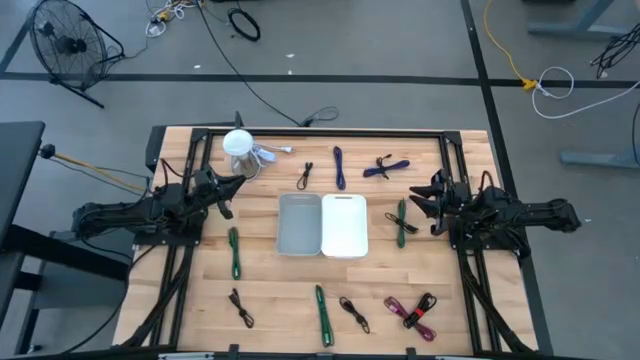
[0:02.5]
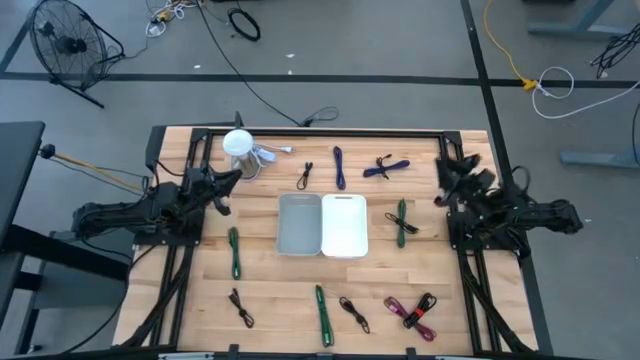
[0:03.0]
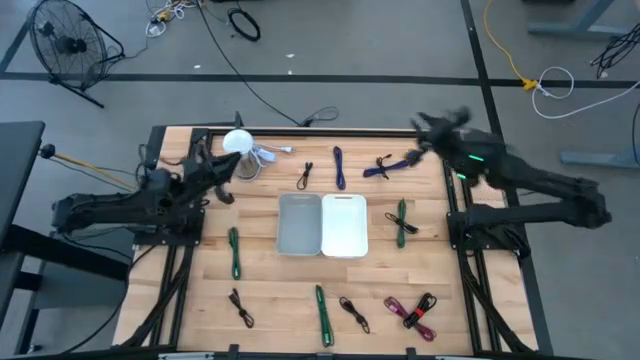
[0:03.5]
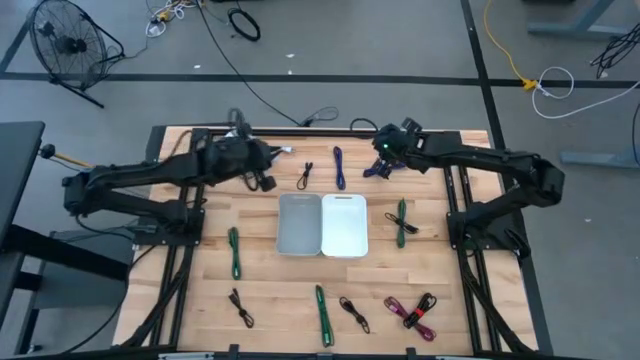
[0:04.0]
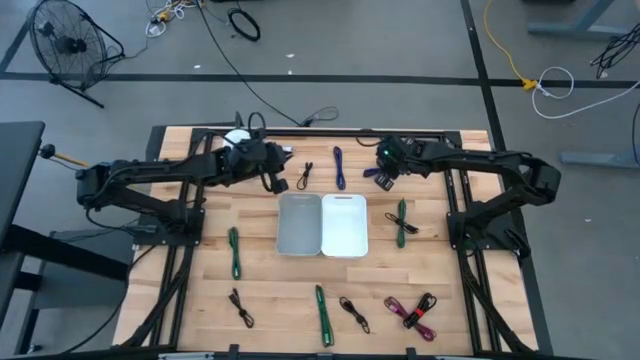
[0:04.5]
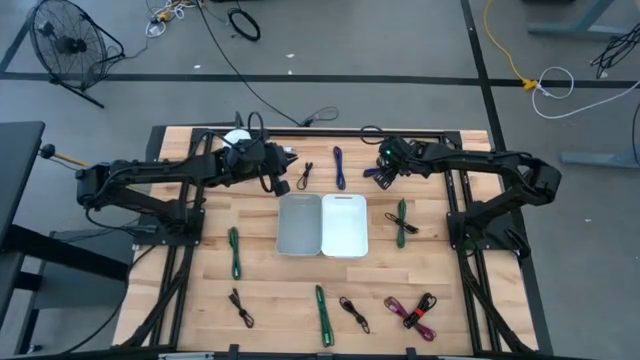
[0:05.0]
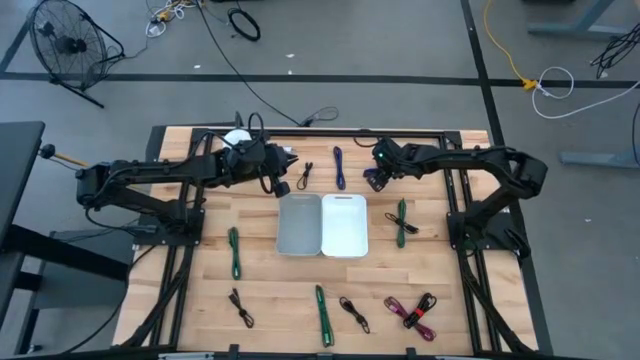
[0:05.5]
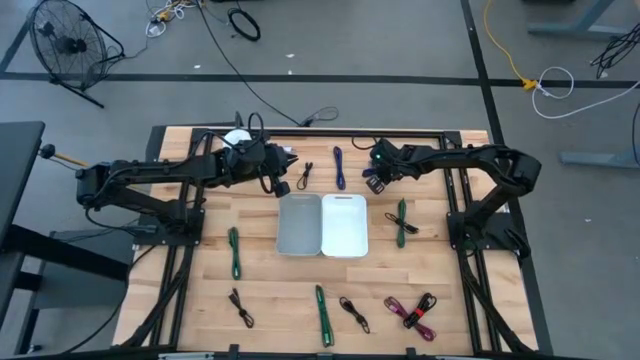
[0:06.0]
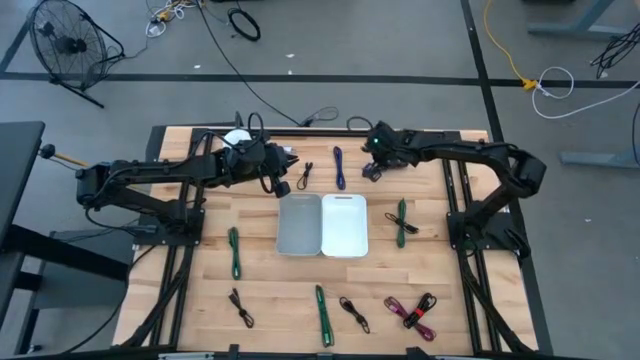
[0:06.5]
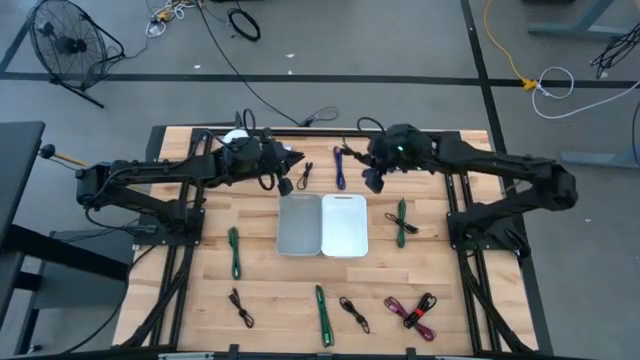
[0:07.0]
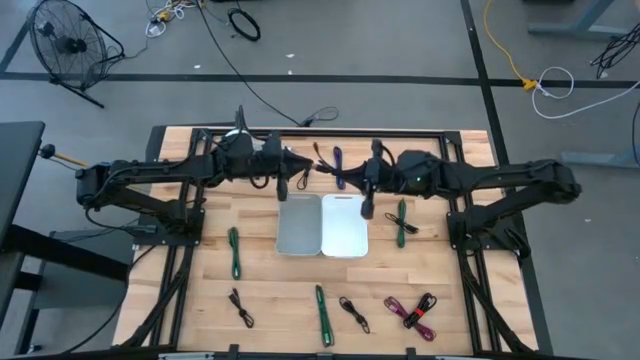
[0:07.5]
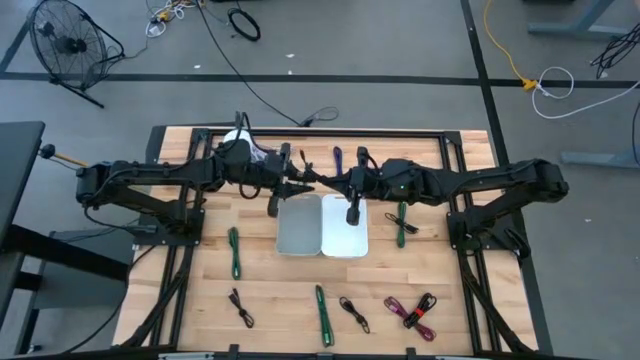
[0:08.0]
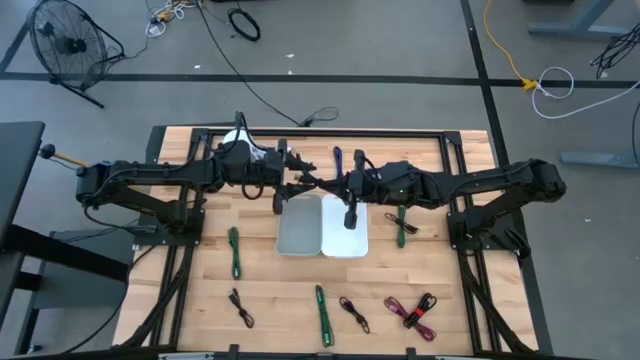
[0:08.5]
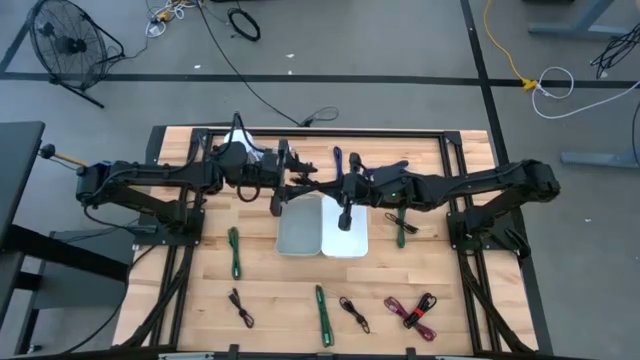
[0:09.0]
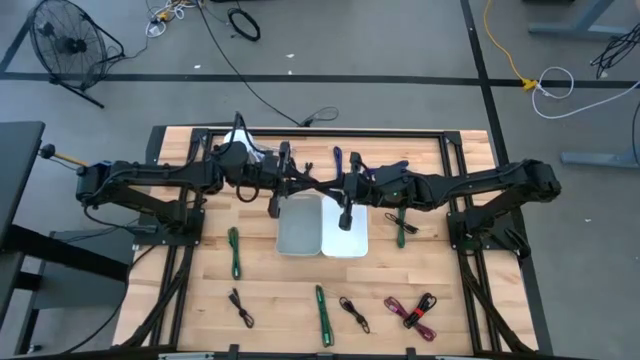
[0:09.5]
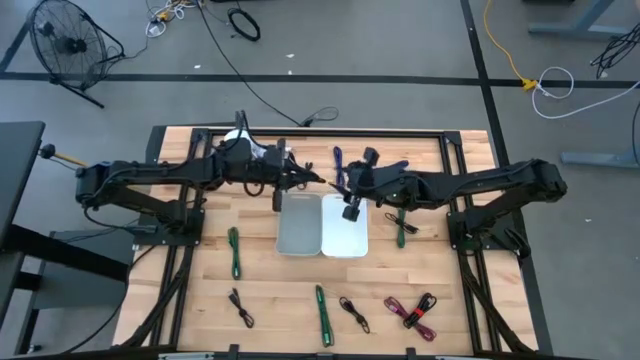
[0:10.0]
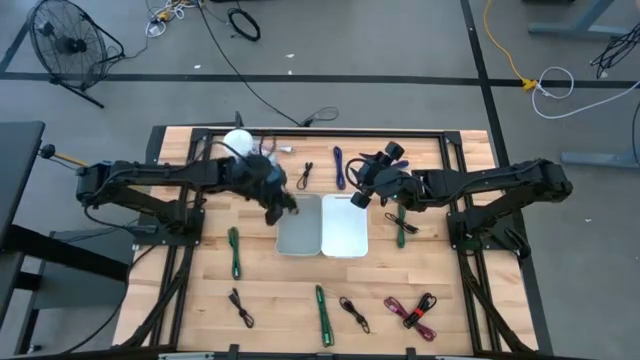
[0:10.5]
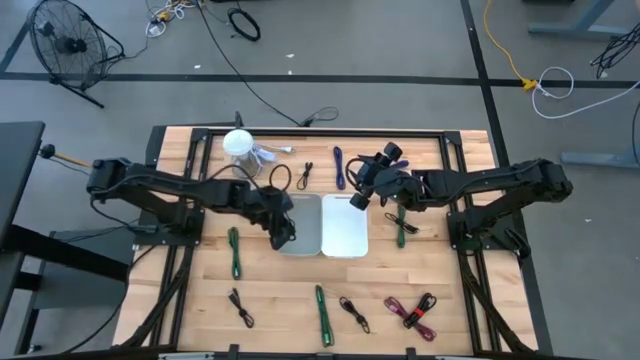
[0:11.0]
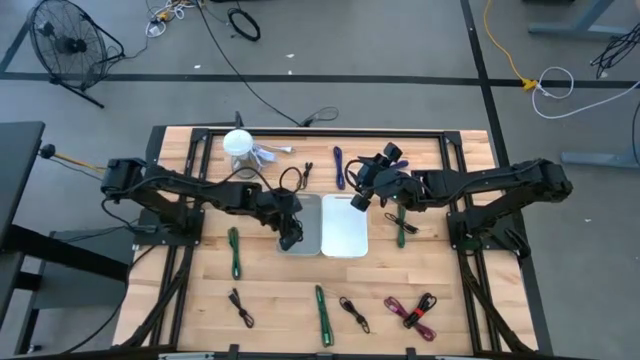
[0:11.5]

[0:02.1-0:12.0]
Task: Pick & Place USB Port
Put the black charger cable into the gray bin

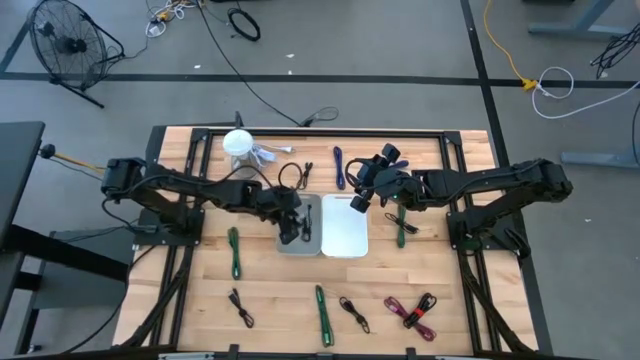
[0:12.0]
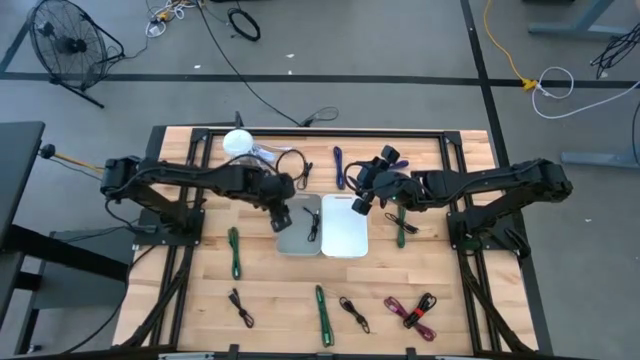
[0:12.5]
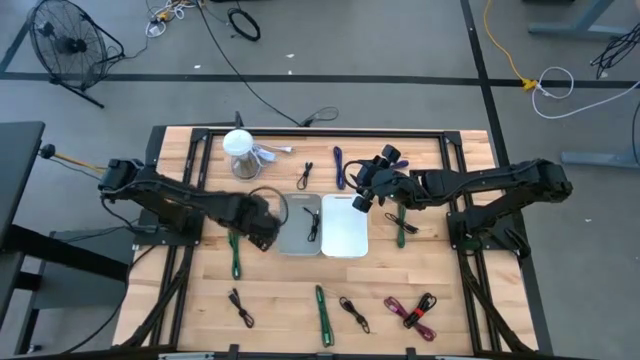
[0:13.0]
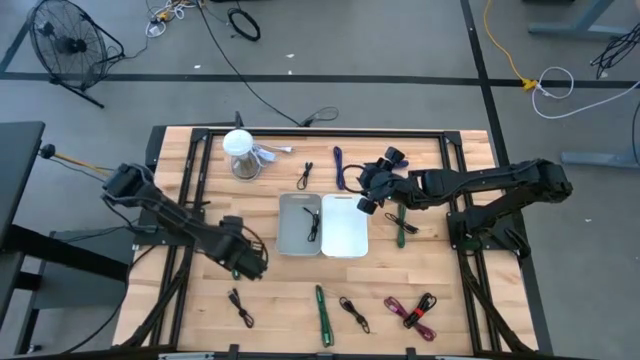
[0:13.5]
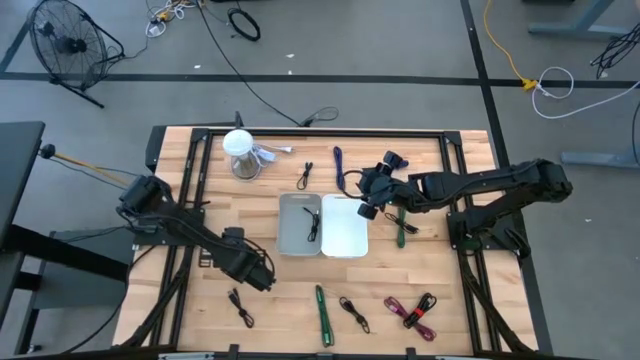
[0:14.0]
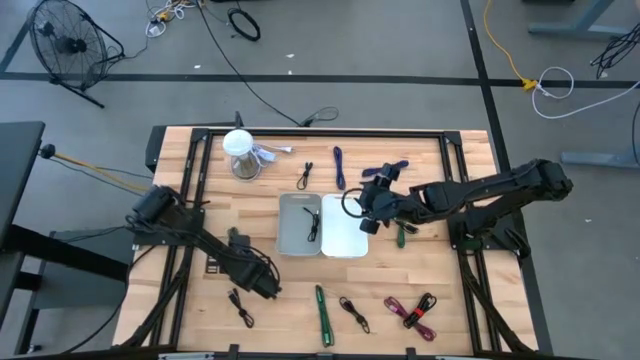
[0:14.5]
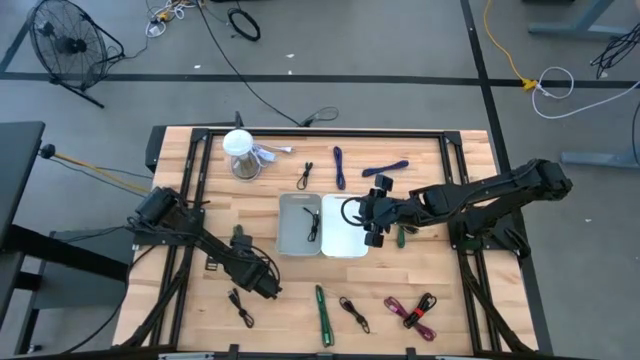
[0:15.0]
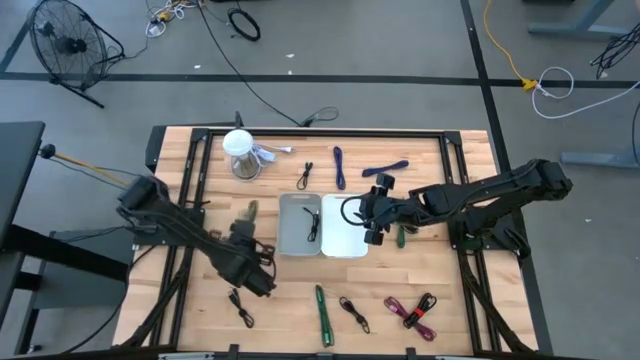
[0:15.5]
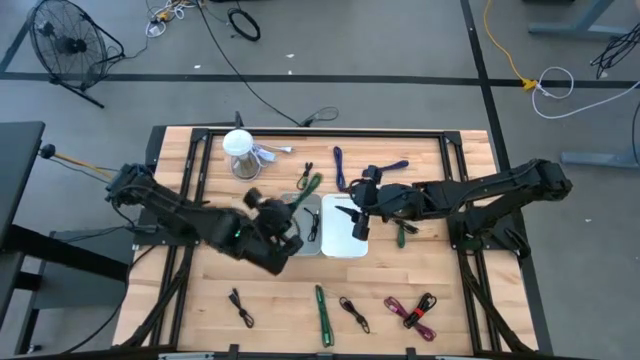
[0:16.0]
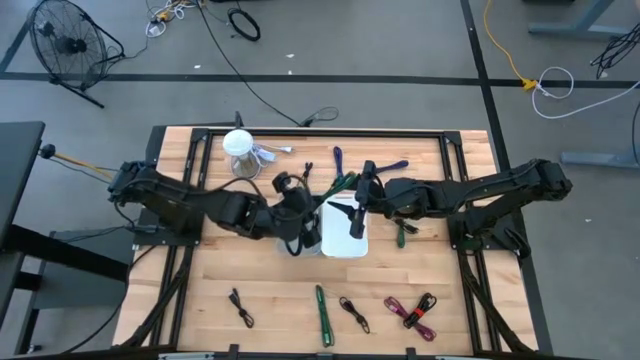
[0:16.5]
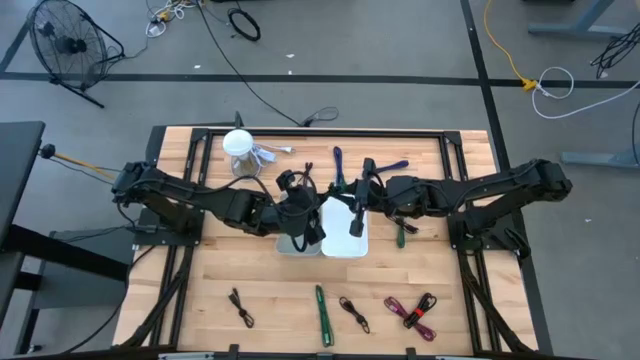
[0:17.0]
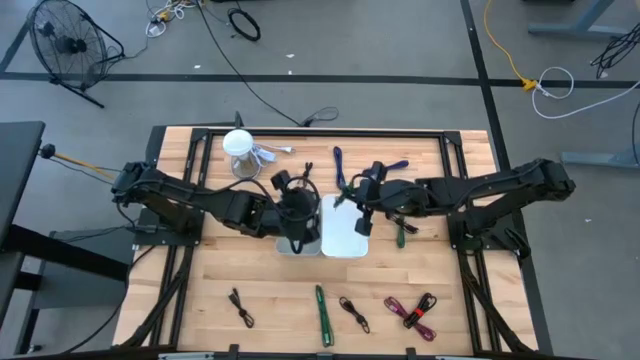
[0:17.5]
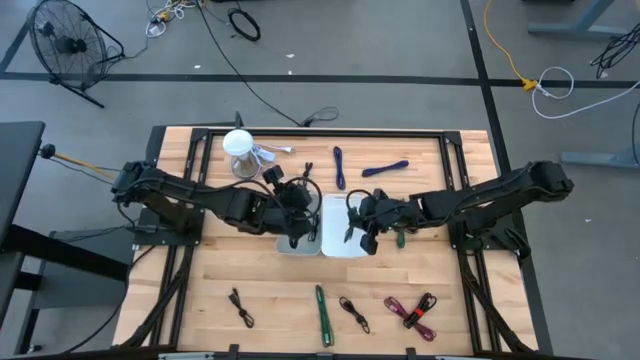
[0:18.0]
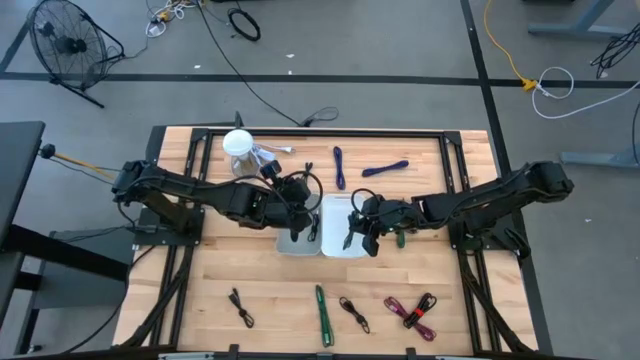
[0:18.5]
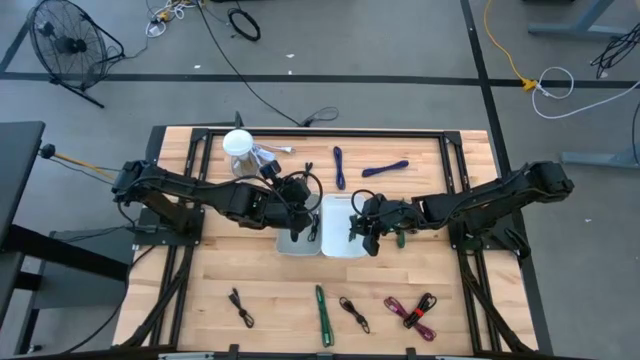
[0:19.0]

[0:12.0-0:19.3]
Put the green charger cable into the white bin

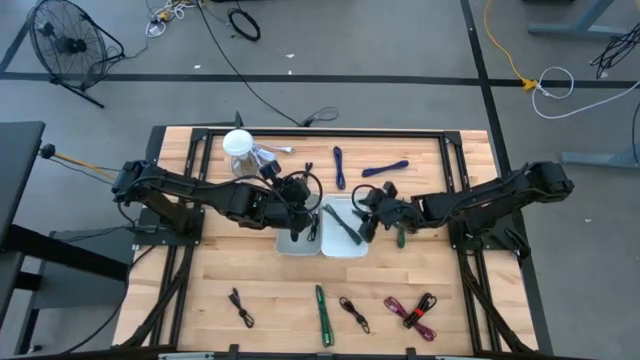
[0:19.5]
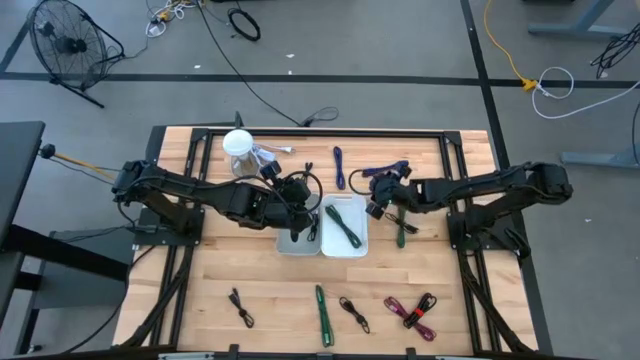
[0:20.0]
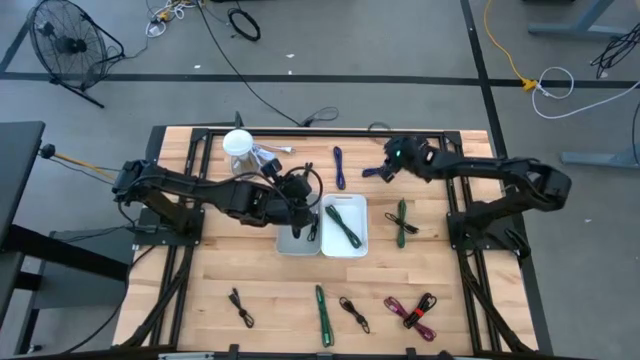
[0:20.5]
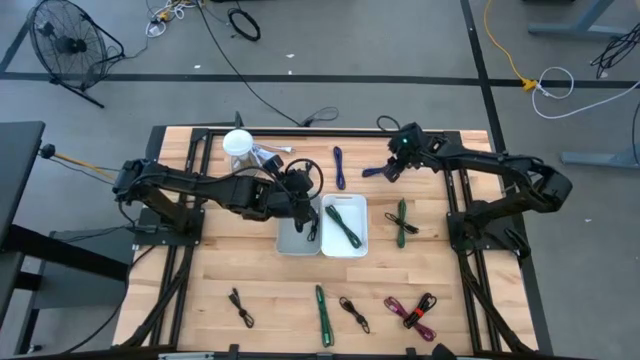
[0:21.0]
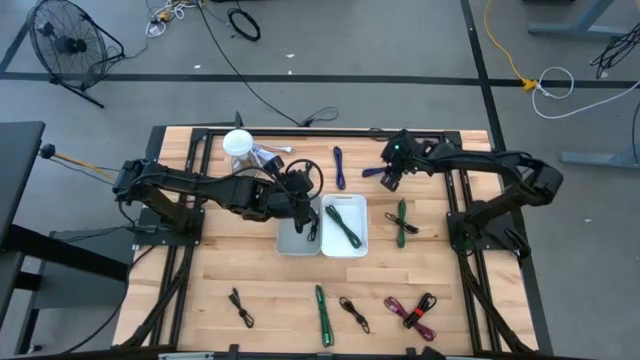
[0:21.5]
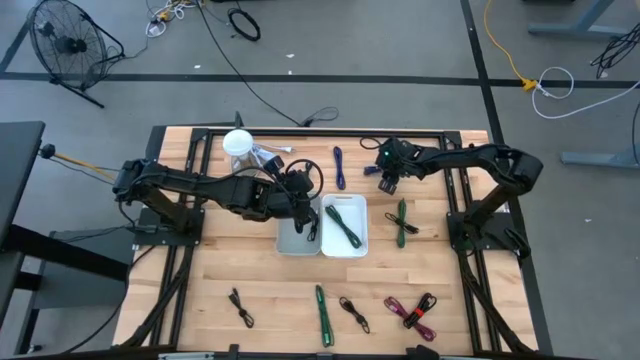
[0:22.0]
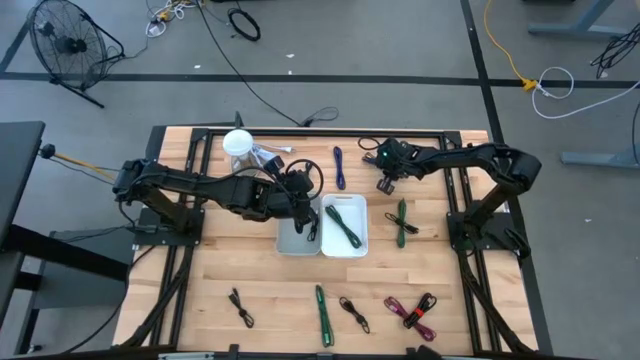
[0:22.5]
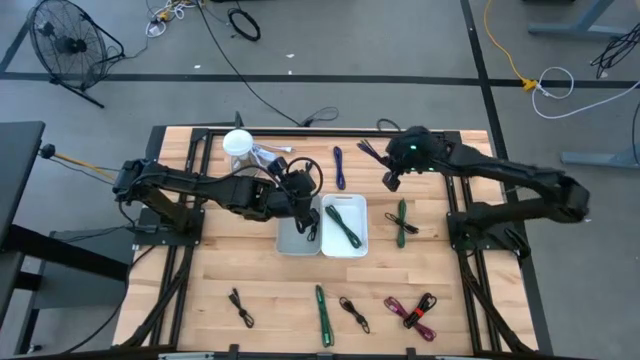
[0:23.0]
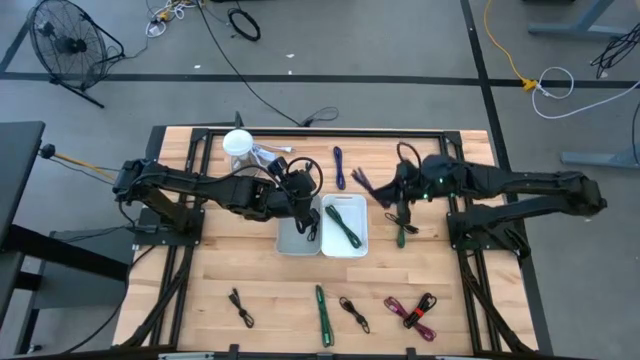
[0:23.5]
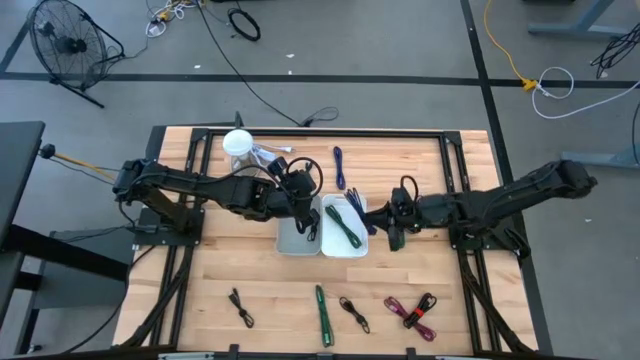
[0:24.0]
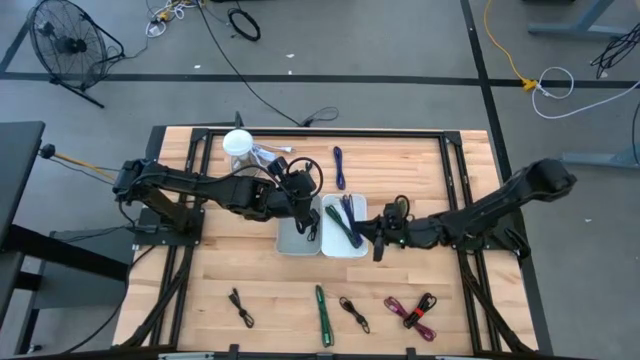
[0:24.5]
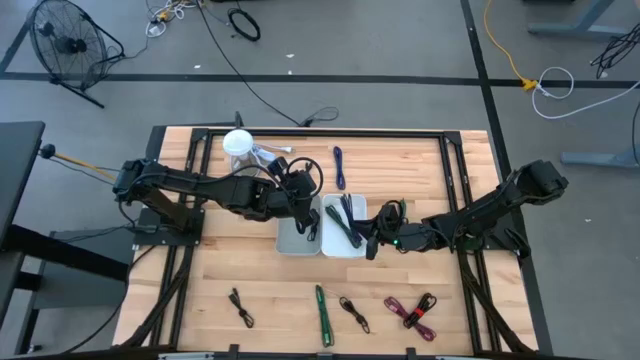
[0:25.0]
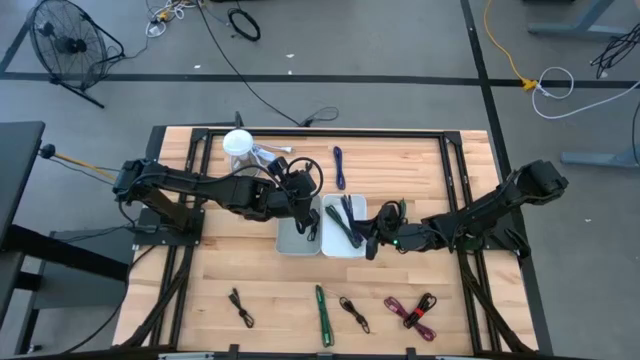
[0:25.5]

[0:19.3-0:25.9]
Put the purple charger cable into the white bin
